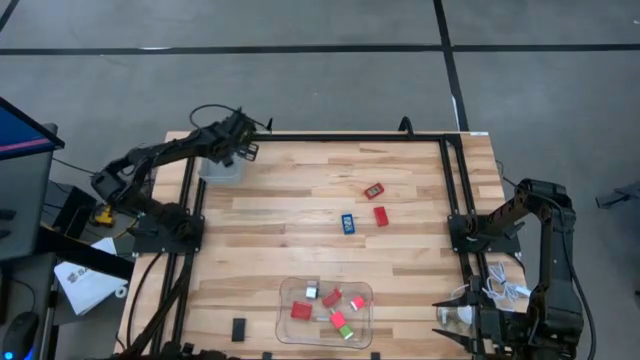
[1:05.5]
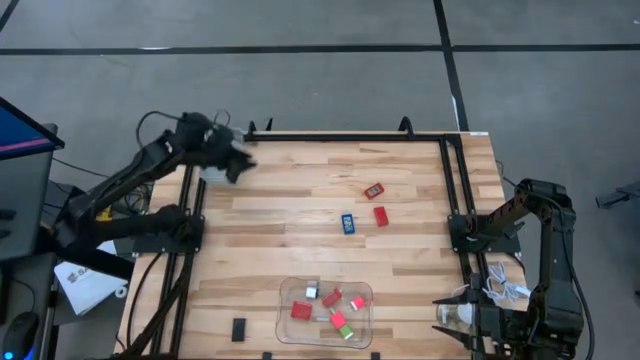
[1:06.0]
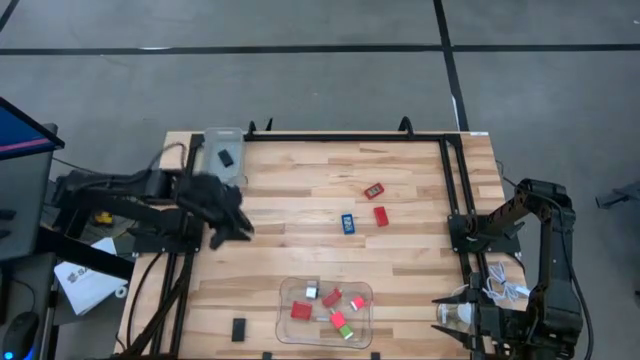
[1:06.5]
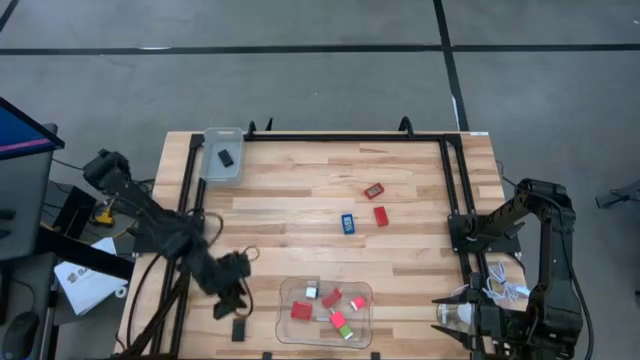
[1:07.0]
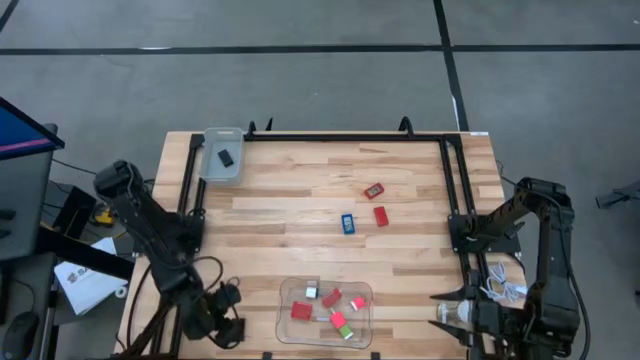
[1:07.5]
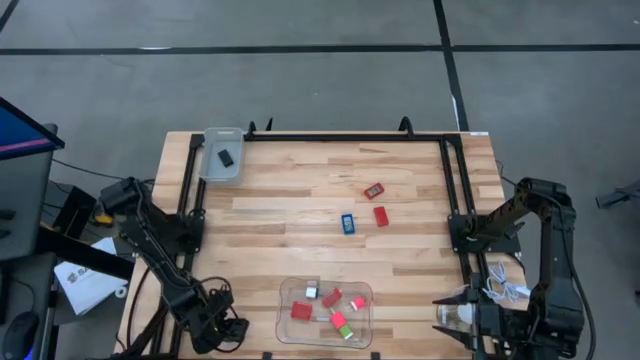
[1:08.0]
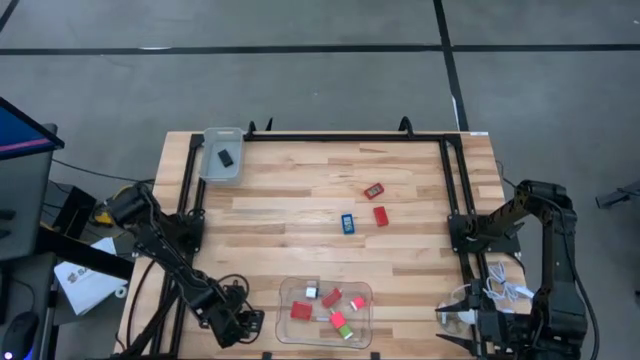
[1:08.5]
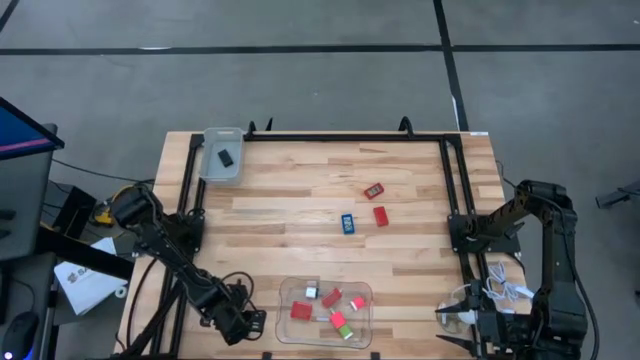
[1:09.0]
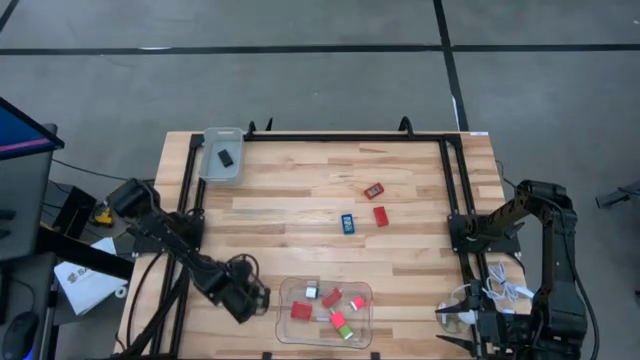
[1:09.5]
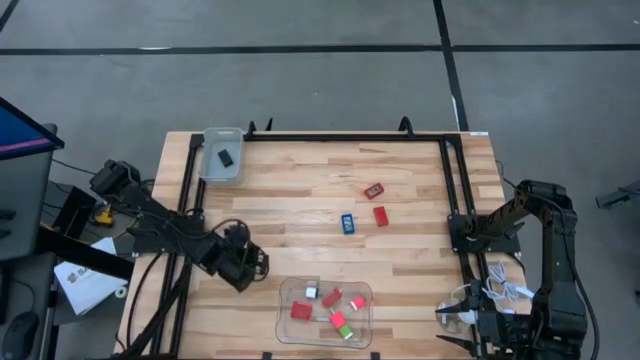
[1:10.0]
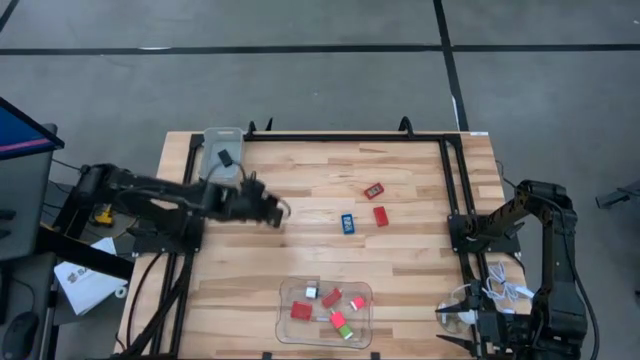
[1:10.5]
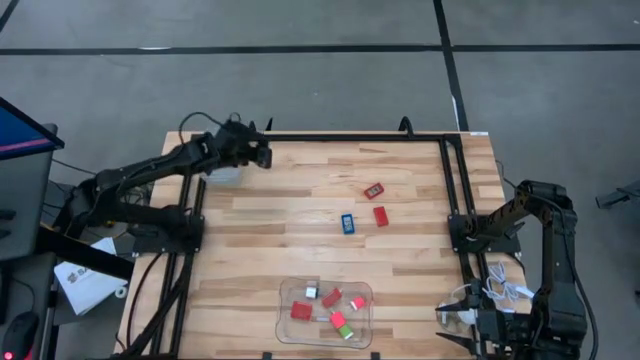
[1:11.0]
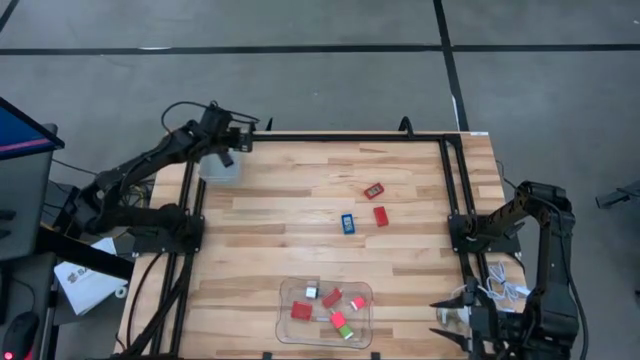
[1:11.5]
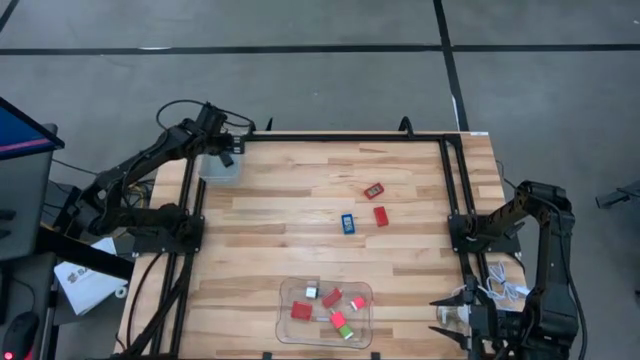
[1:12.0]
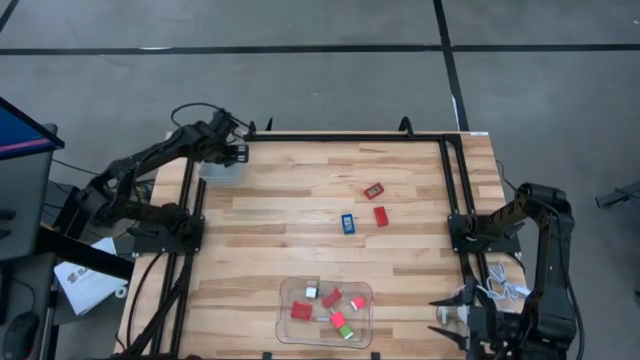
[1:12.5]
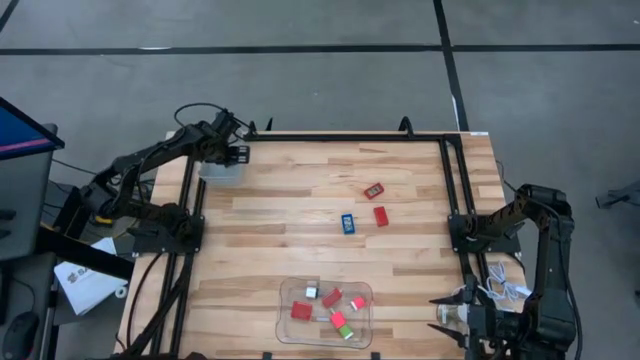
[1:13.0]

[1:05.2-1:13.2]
Task: Pick & Place Office items
Put the black digital clock into the gray bin

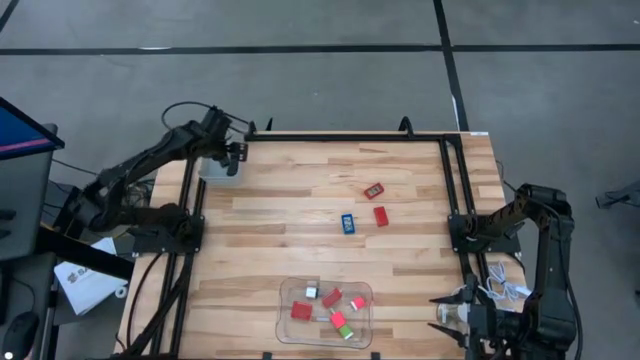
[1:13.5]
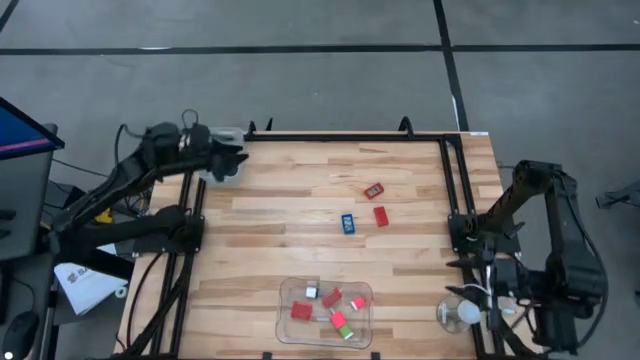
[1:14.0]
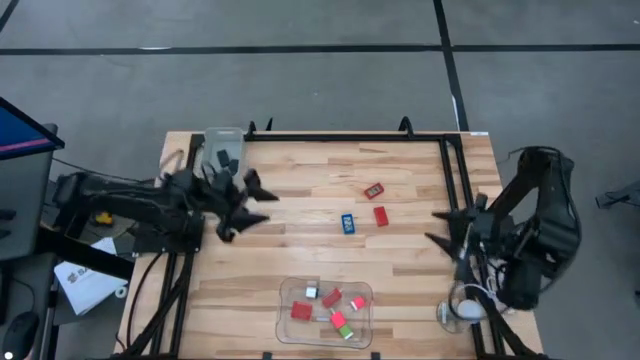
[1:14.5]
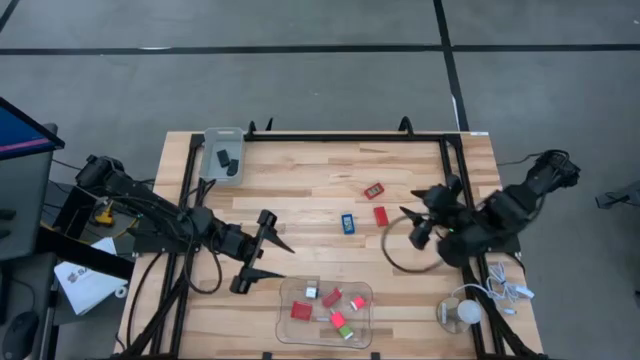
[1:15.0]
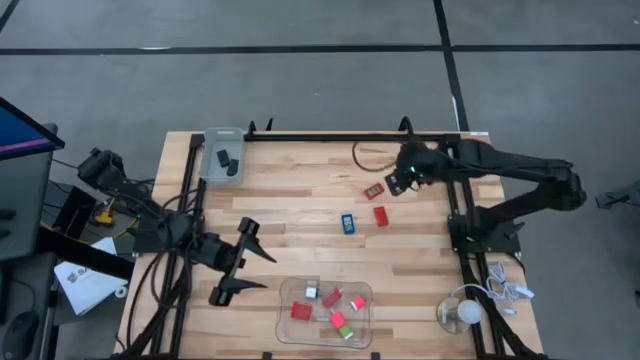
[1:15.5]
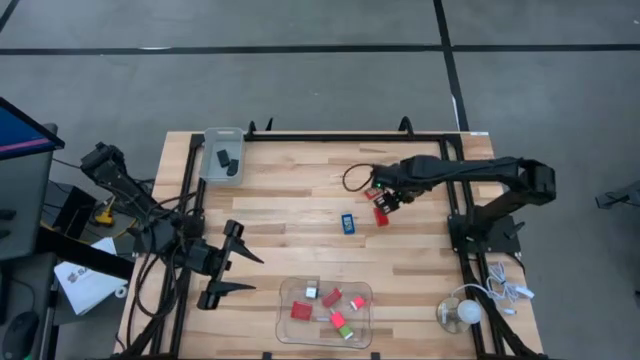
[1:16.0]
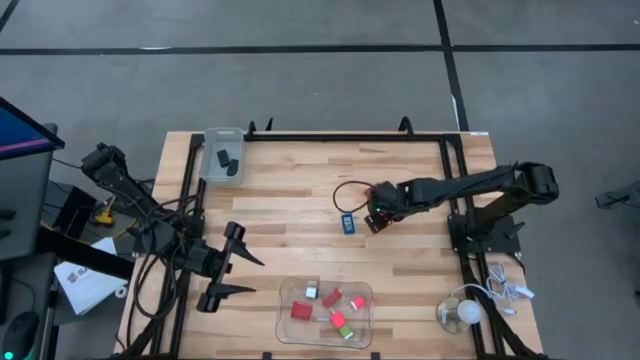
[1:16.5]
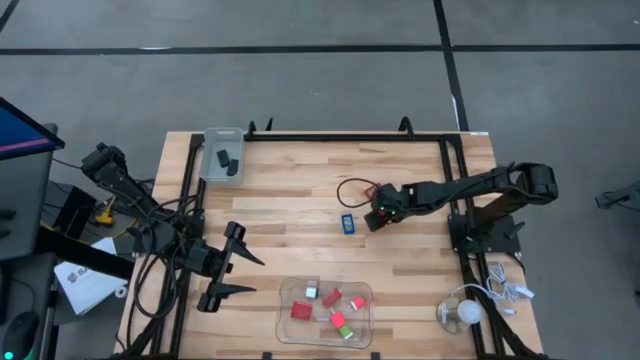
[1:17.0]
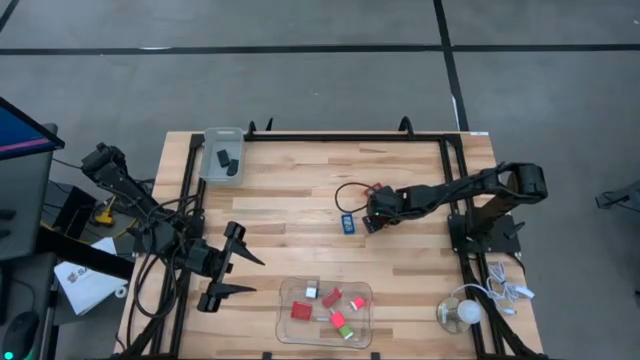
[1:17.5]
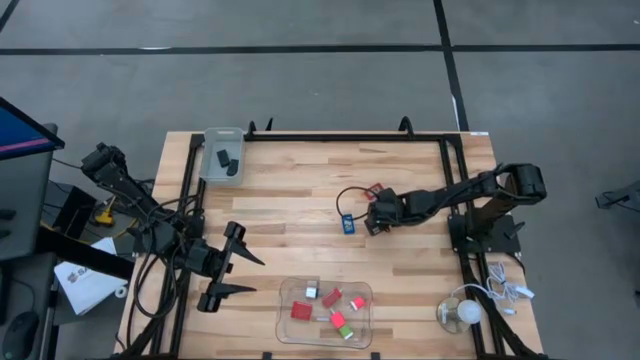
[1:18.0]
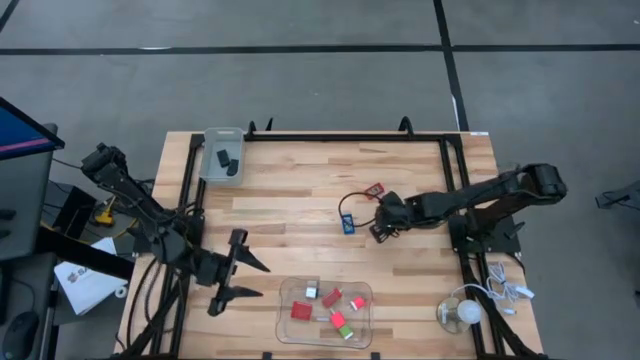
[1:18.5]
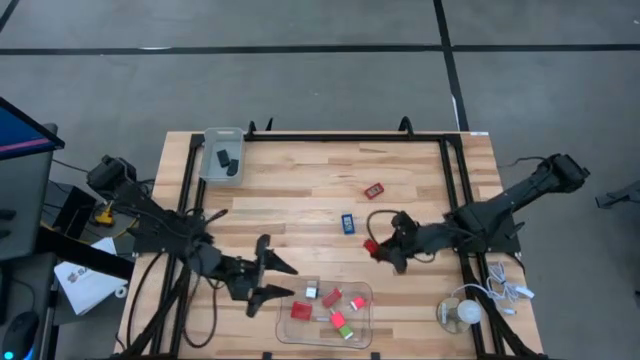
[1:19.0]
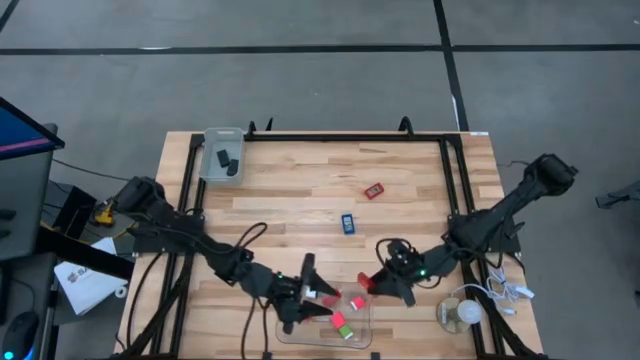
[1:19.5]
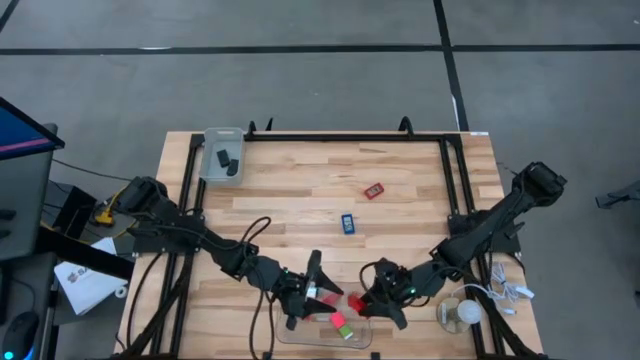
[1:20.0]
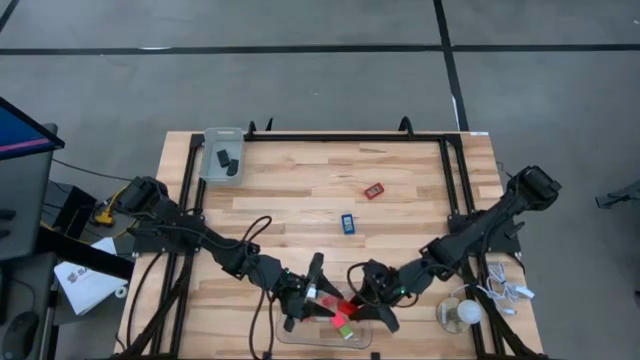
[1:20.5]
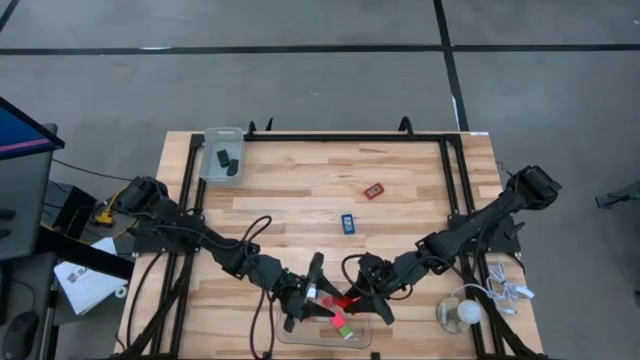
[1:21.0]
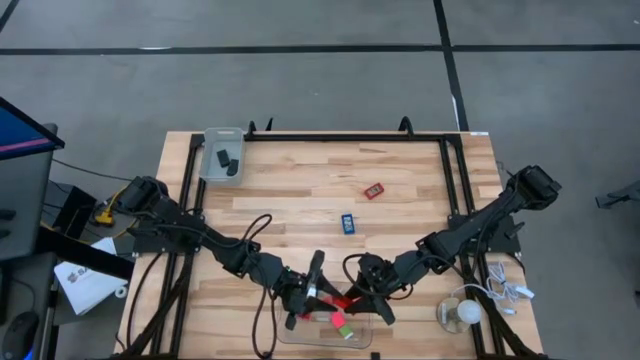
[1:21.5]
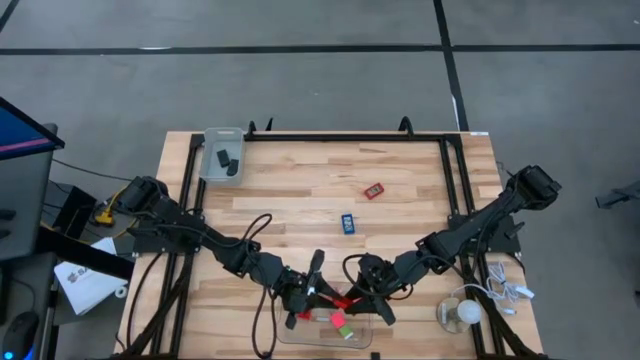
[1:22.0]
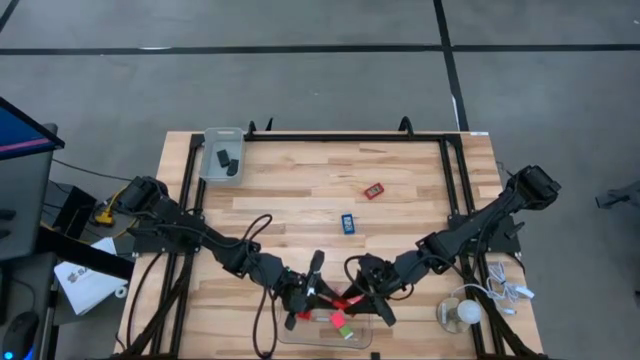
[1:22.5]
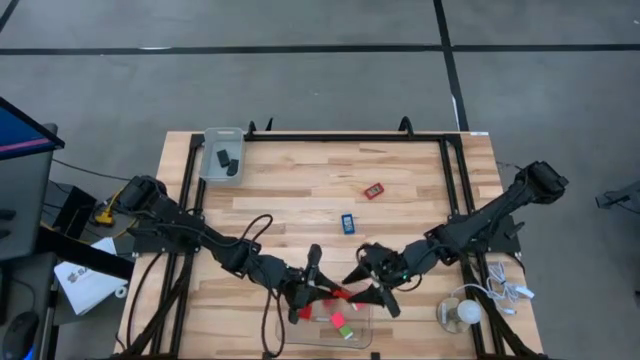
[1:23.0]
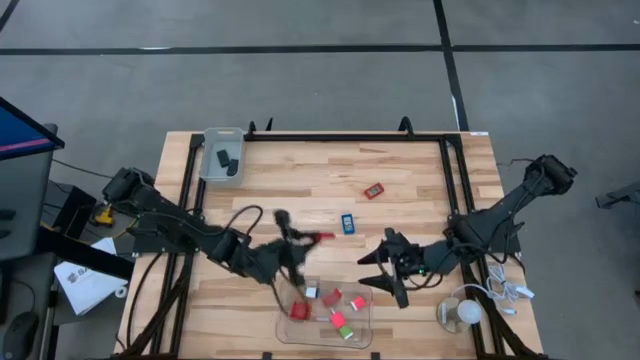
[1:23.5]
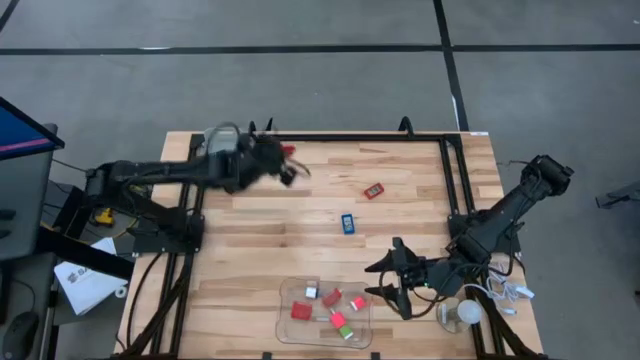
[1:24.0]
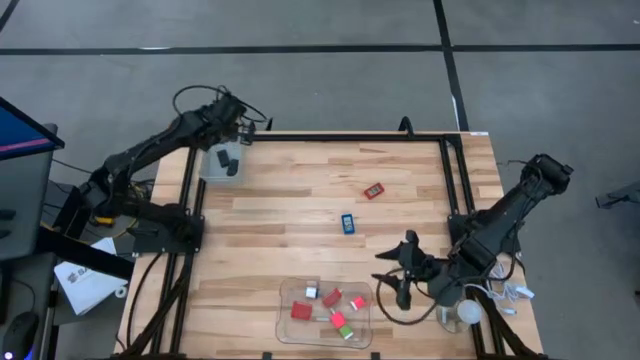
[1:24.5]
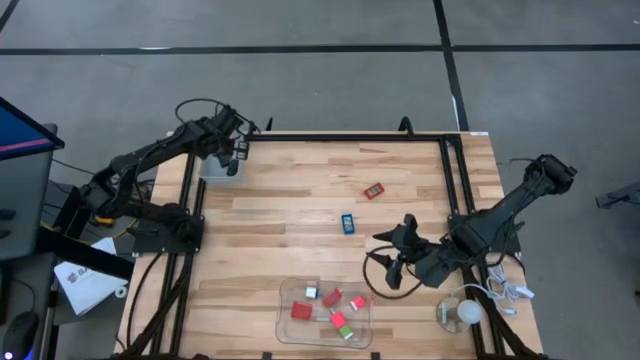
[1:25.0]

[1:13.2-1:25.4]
Put the bottom red digital clock into the gray bin

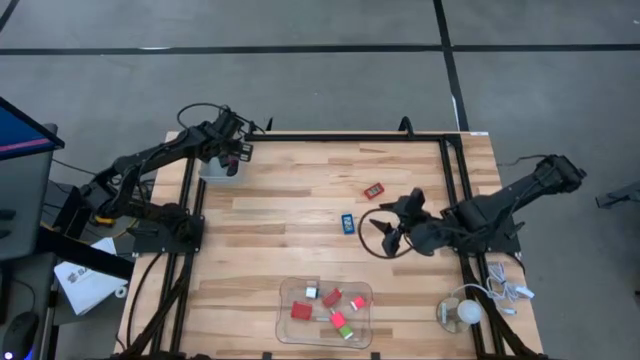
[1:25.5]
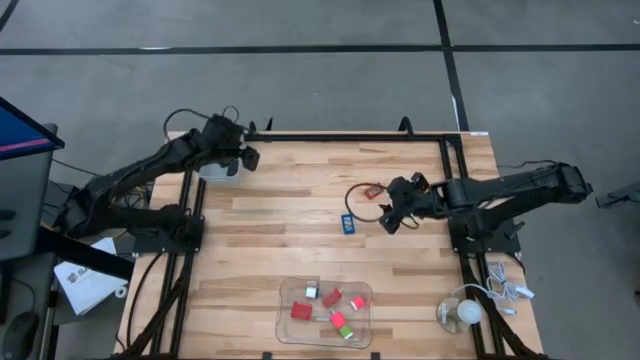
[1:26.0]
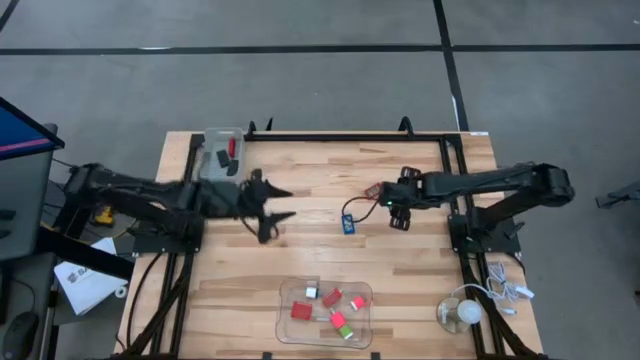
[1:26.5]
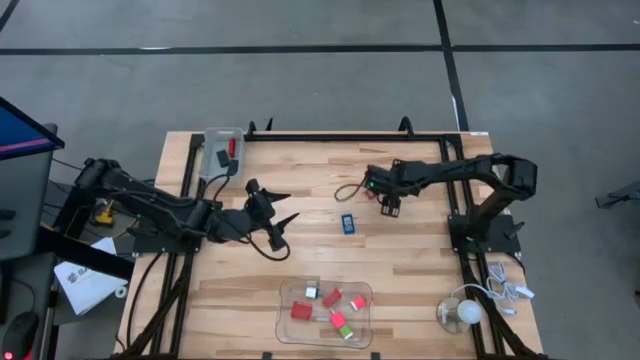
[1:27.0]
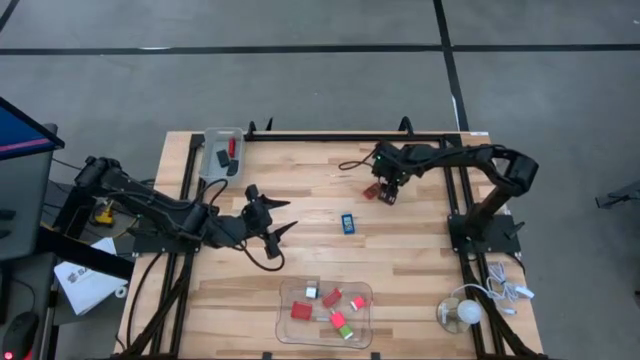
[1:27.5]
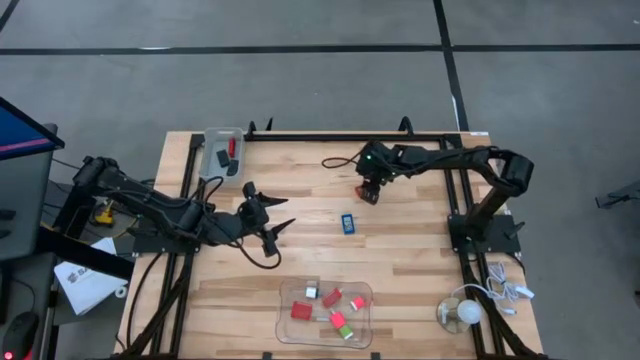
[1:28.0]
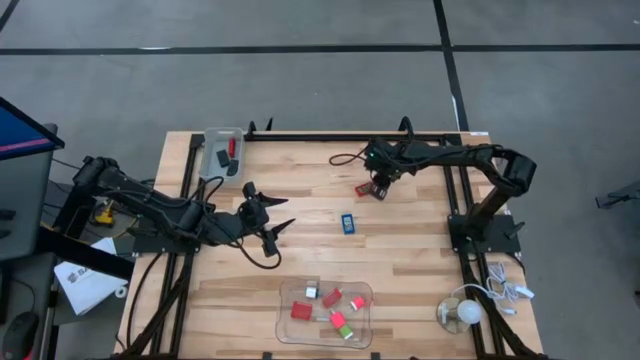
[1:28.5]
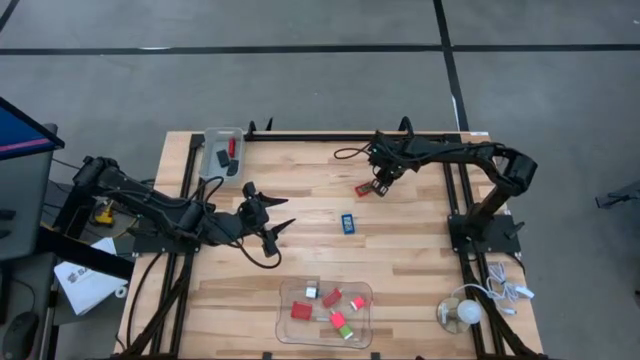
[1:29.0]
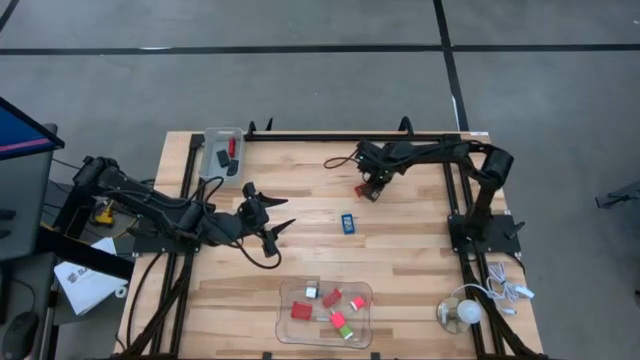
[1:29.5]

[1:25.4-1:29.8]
Put the red digital clock into the gray bin
